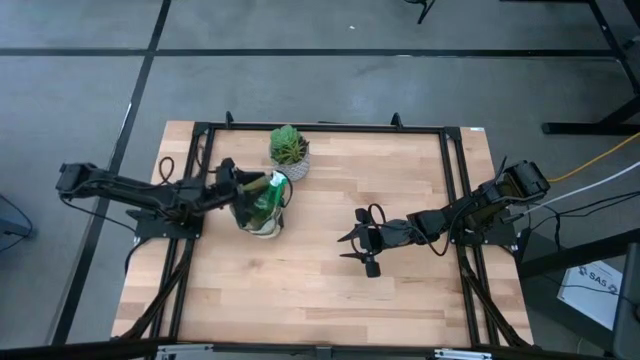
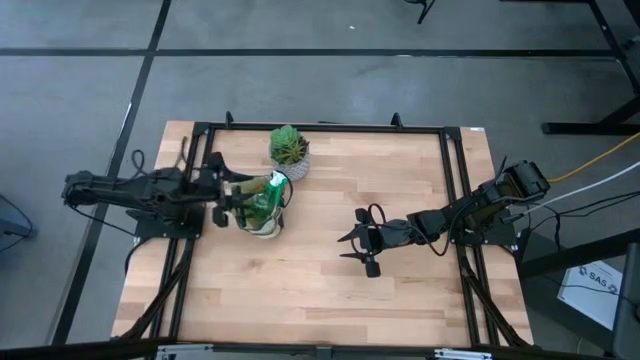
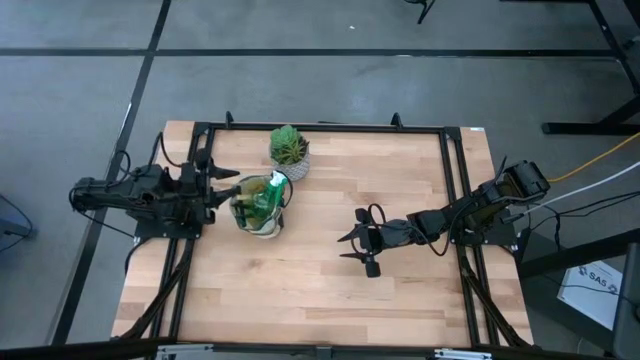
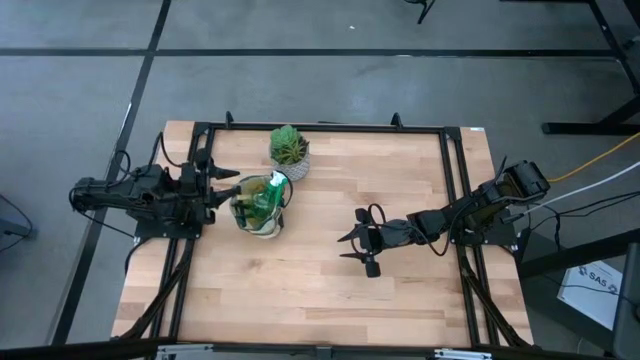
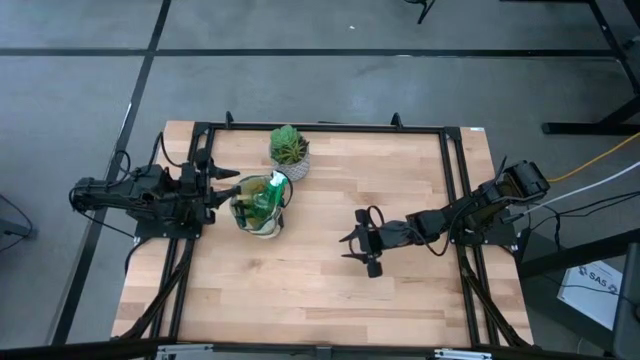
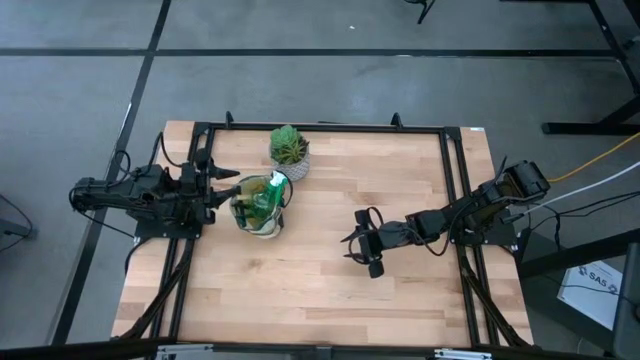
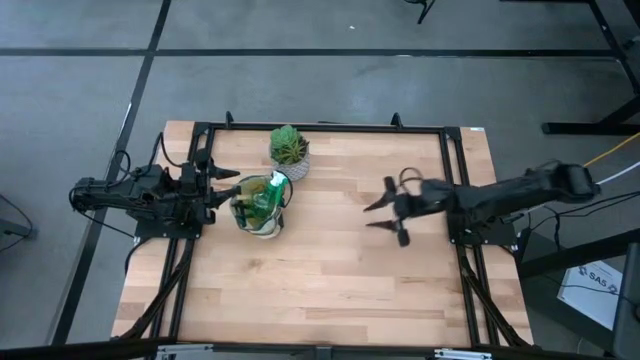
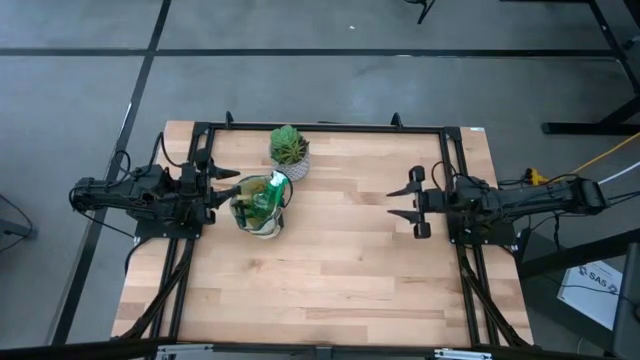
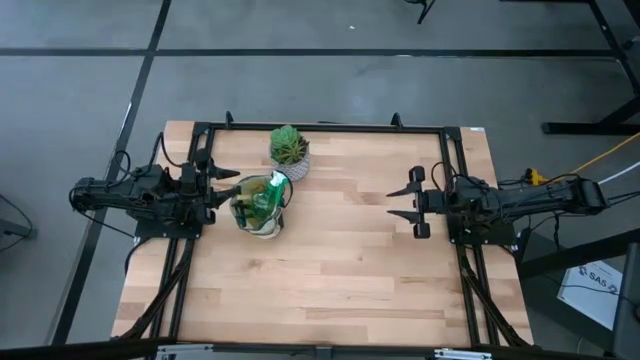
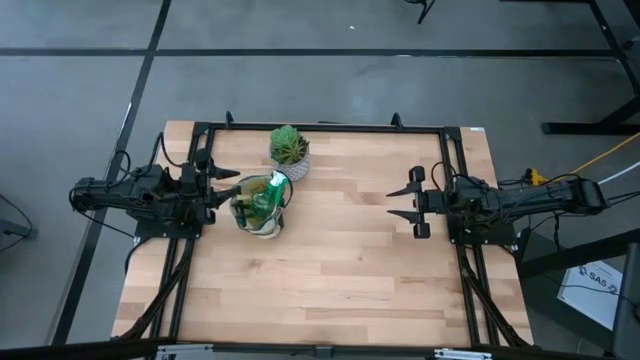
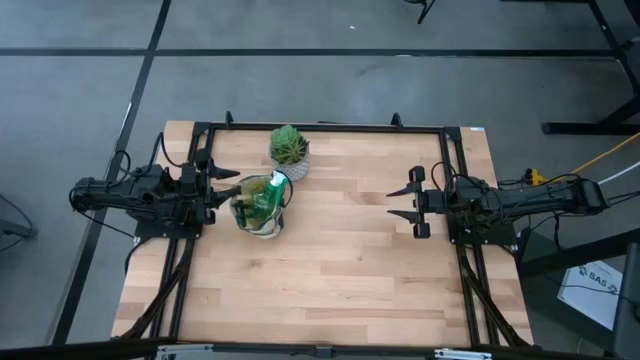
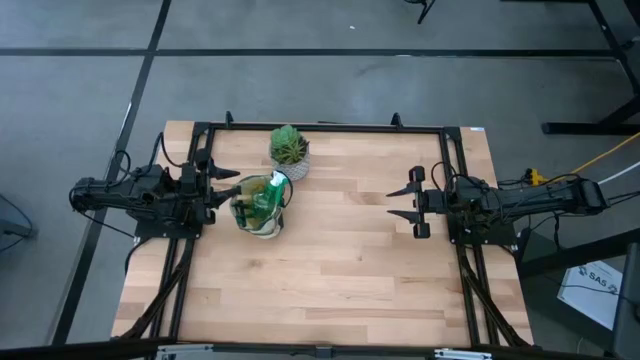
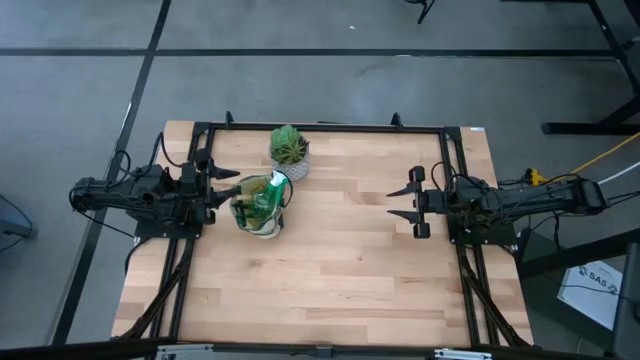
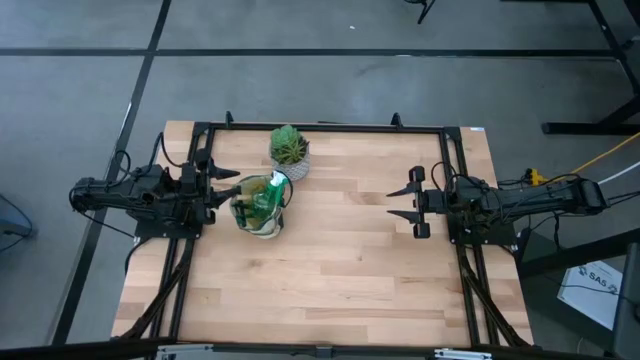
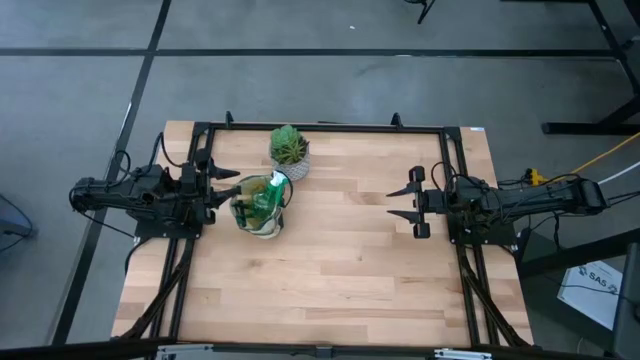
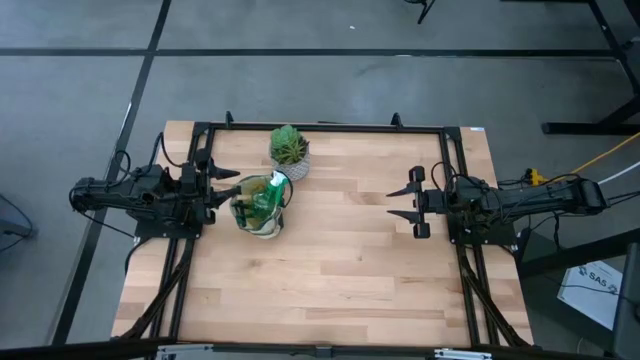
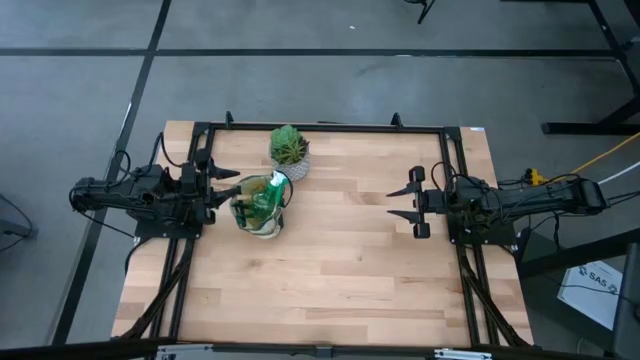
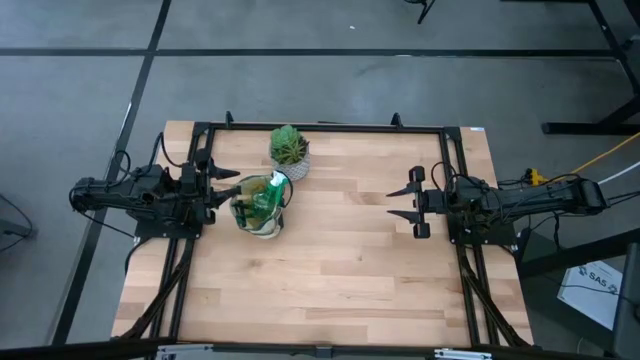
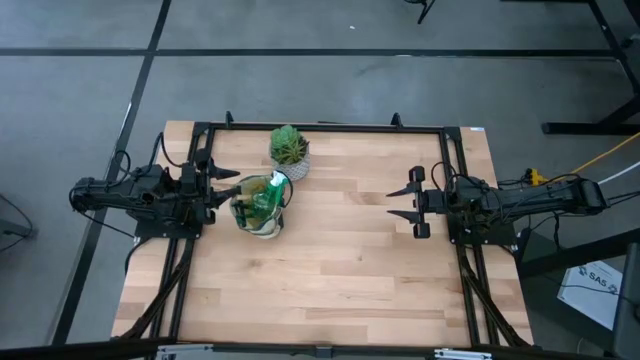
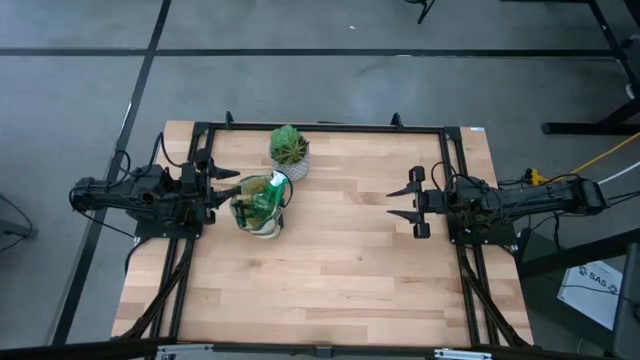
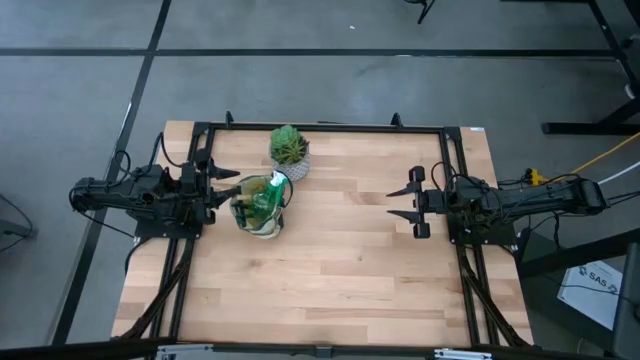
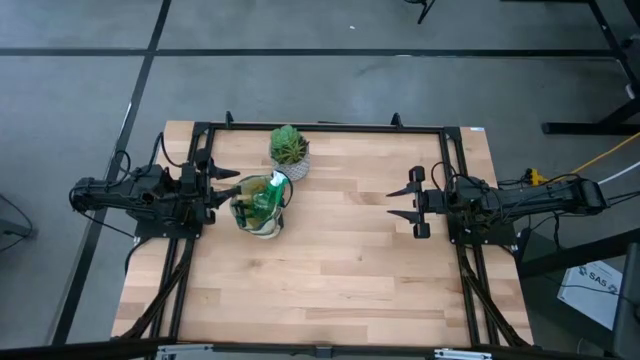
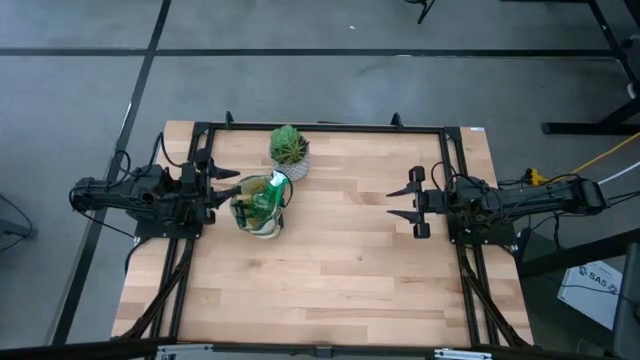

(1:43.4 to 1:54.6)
Task: Pick & Place Garden tools in Gardening bag
Return to Home Position

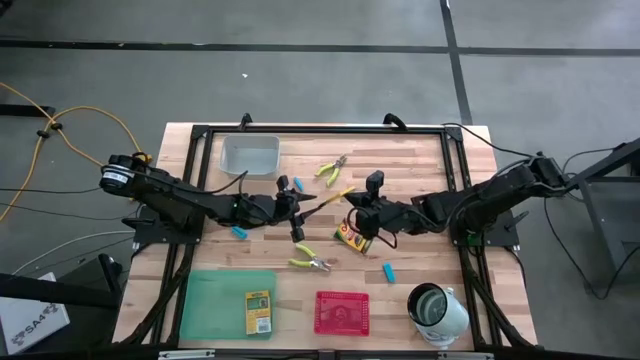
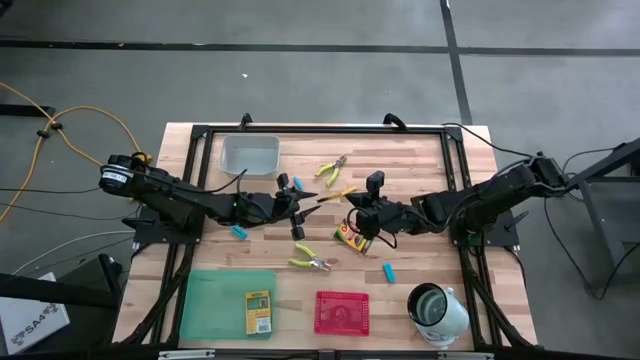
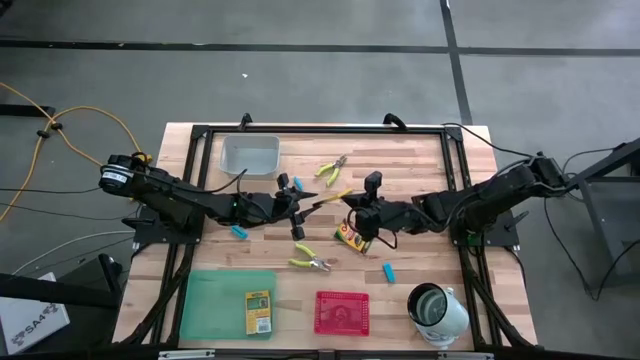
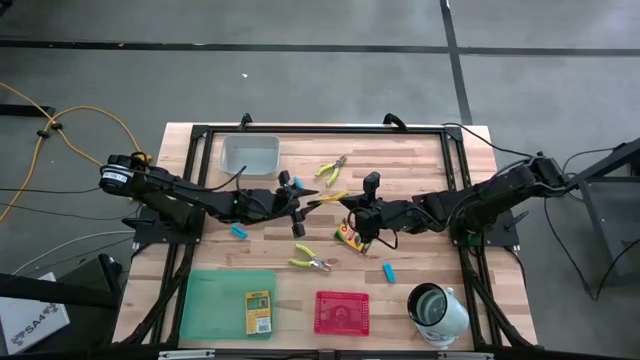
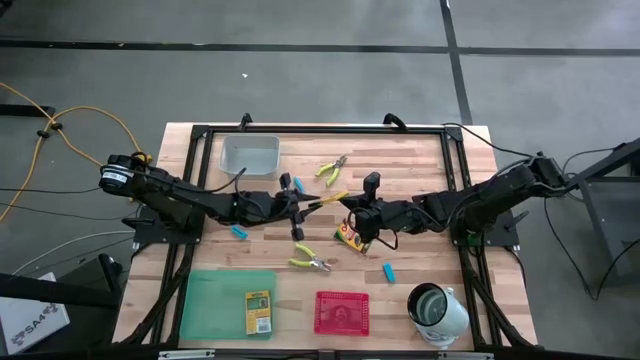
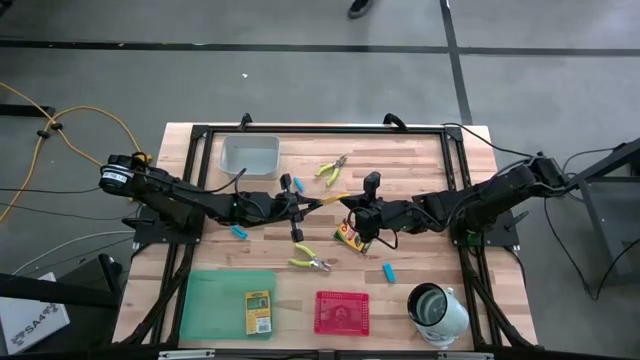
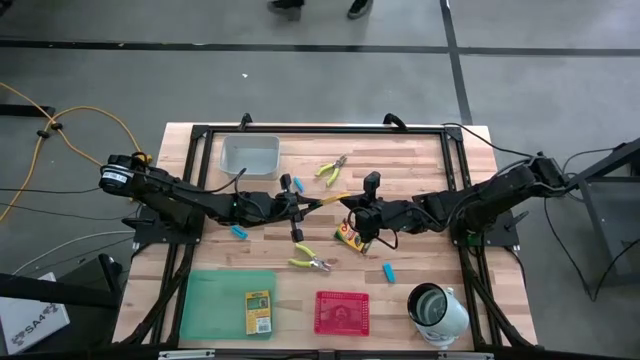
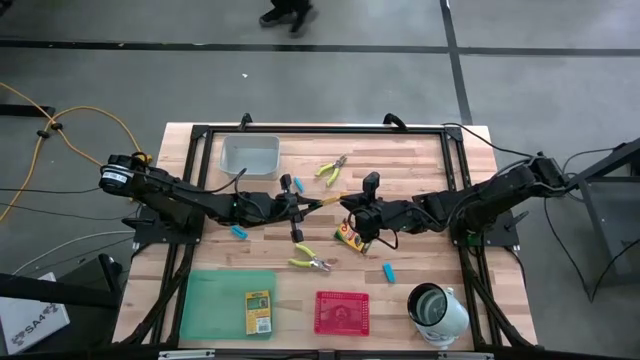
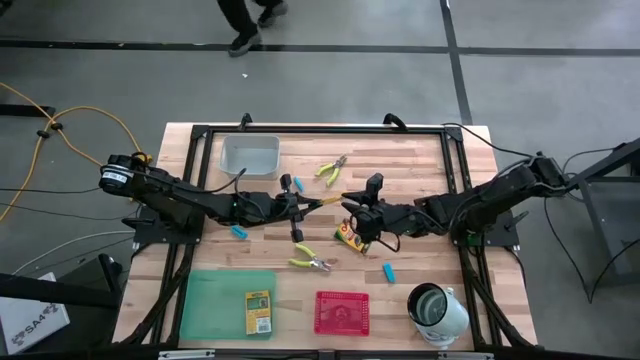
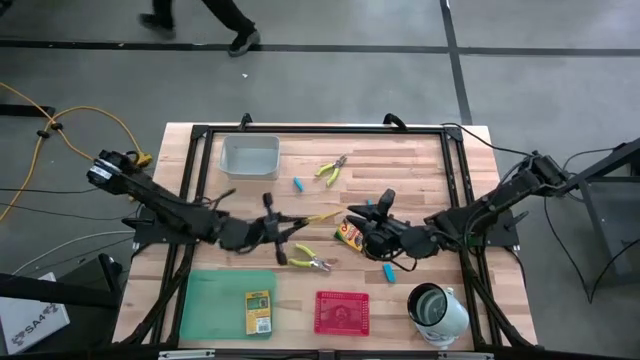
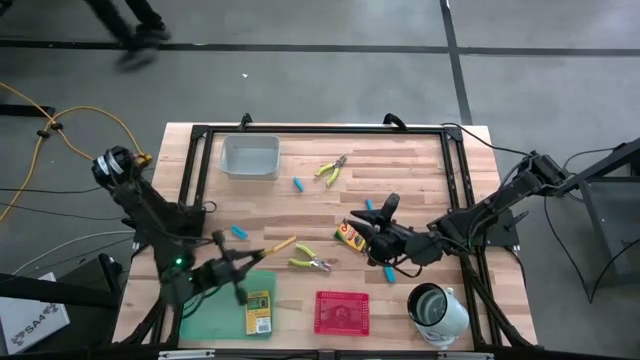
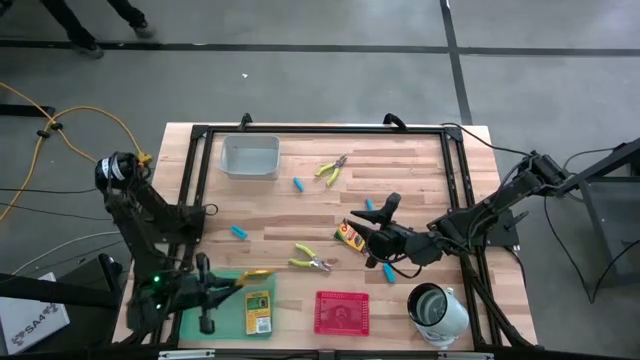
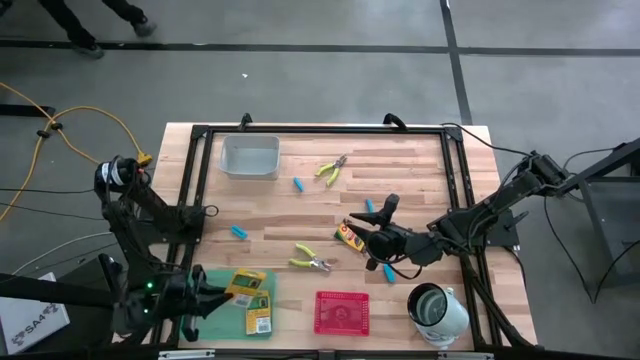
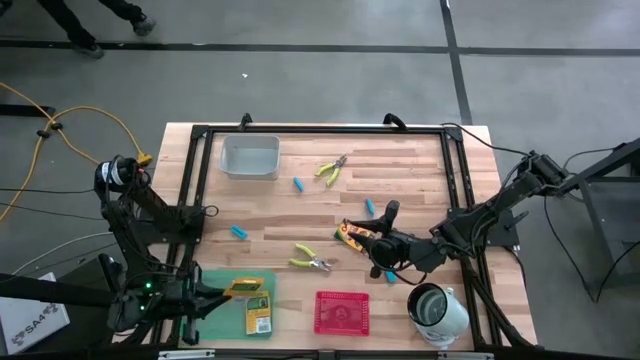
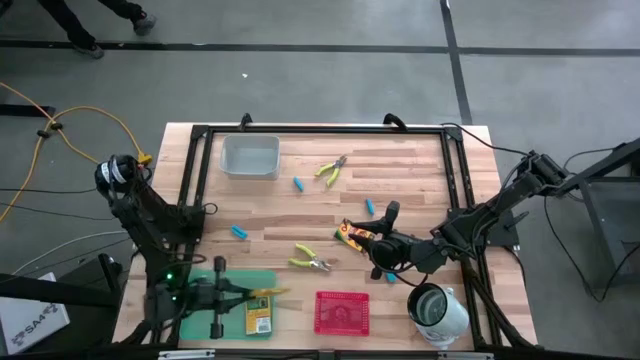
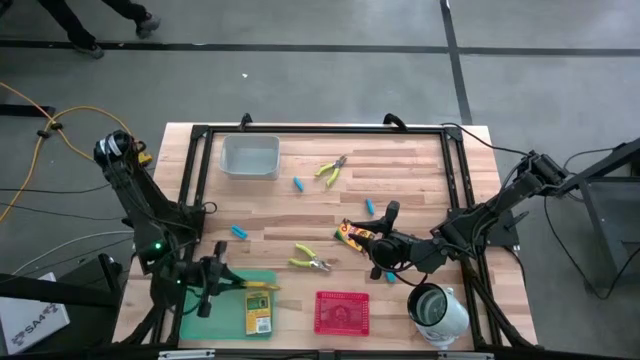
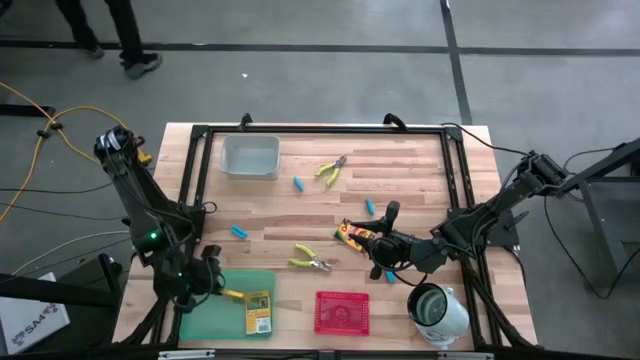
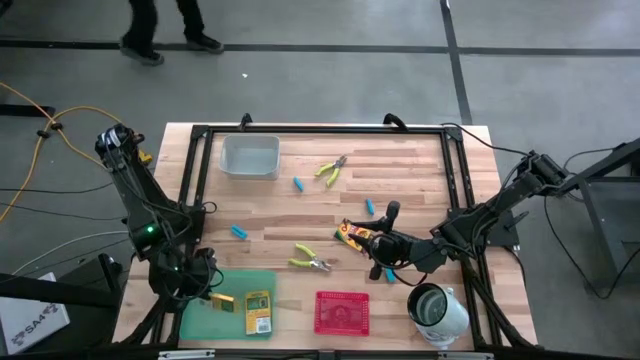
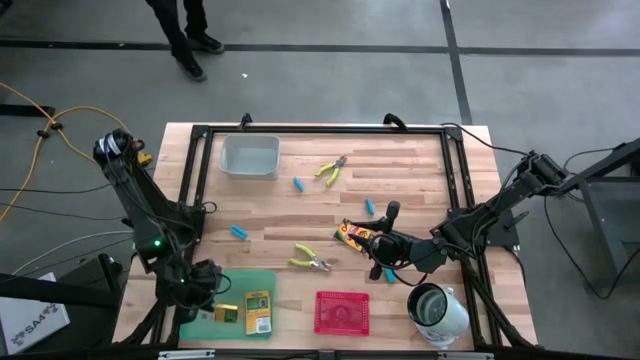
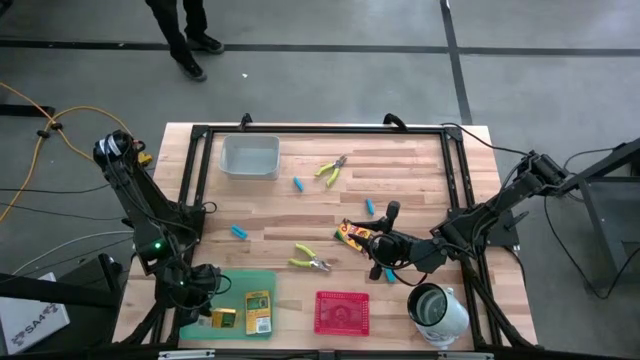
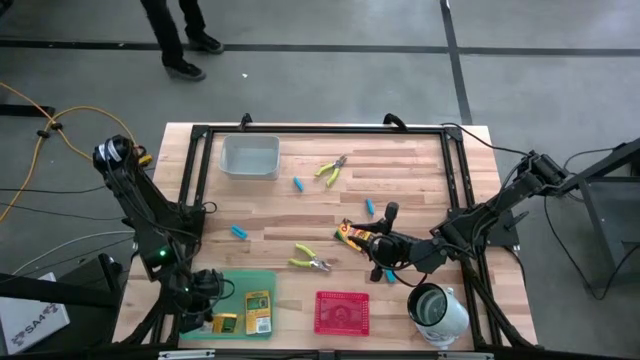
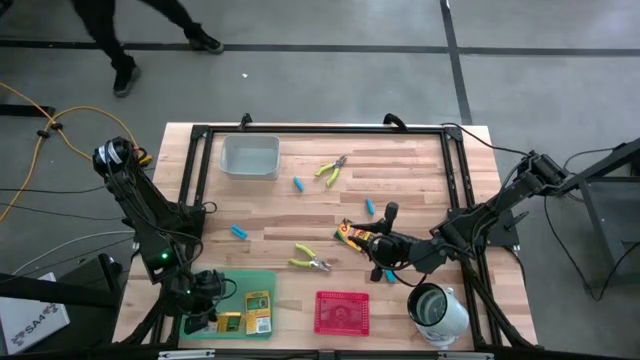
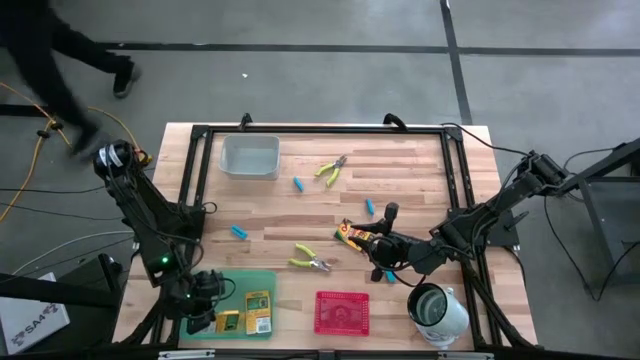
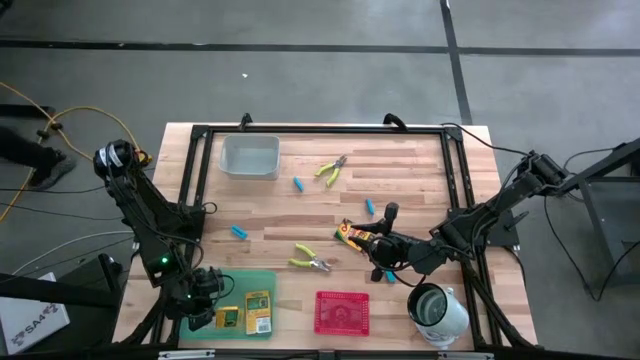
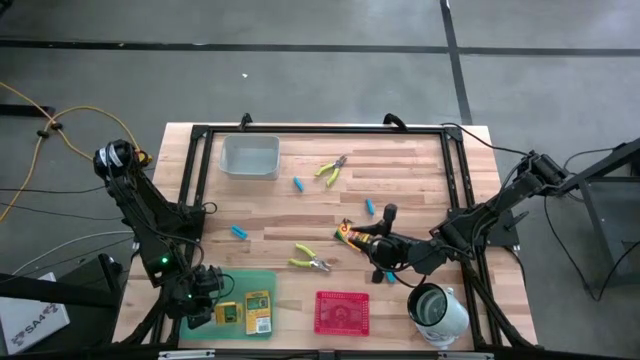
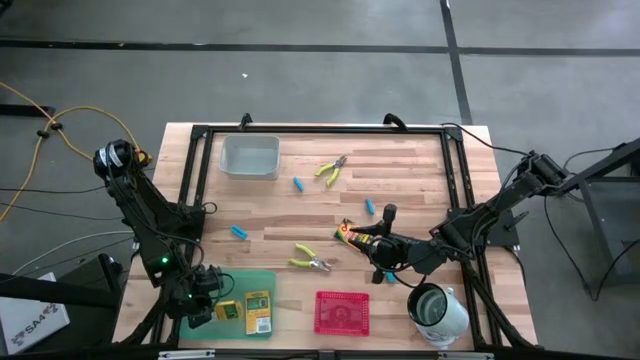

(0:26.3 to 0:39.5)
Task: Pick & Place School Supplies
Put the yellow crayon box into the green bin
